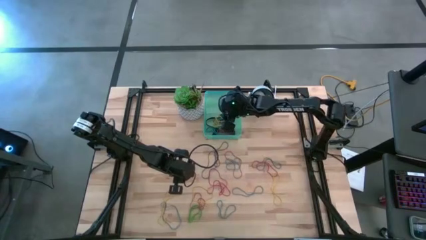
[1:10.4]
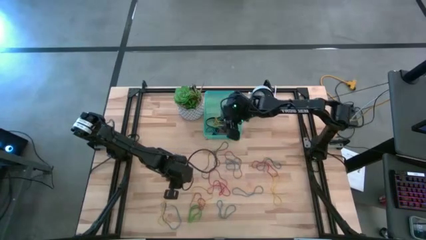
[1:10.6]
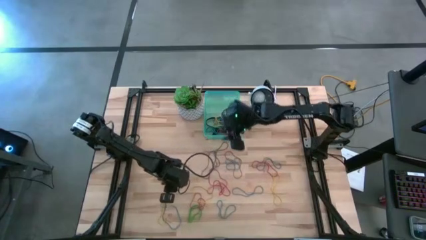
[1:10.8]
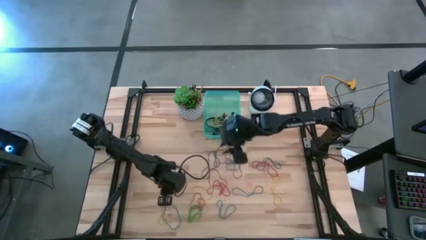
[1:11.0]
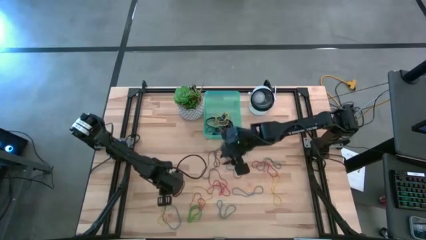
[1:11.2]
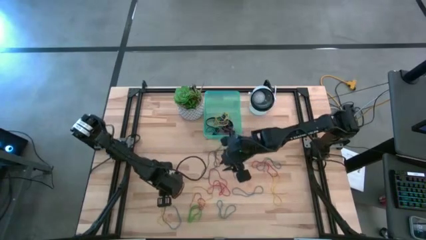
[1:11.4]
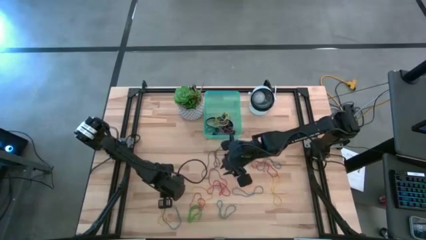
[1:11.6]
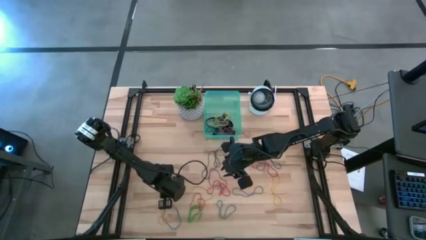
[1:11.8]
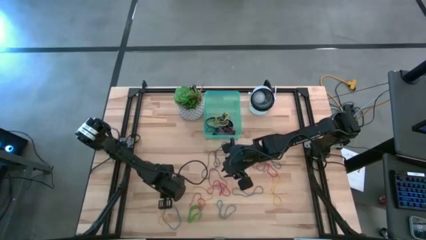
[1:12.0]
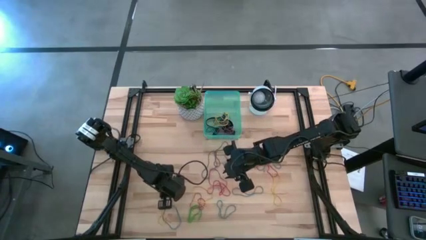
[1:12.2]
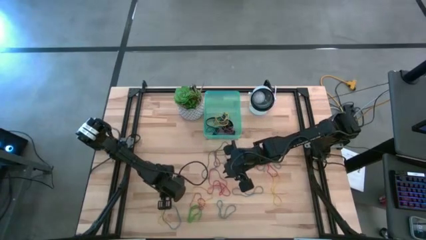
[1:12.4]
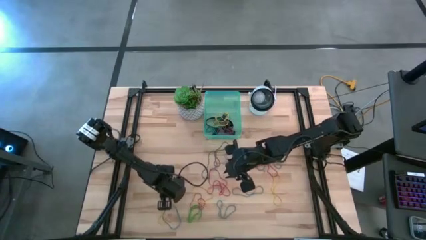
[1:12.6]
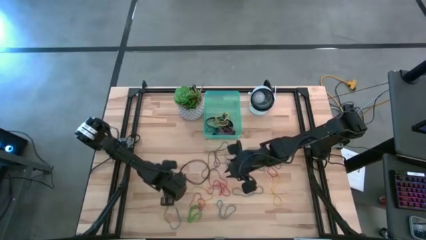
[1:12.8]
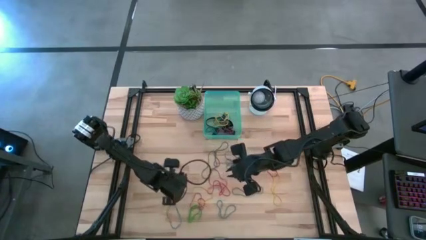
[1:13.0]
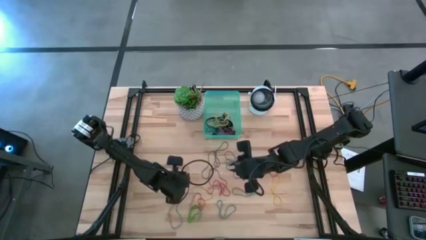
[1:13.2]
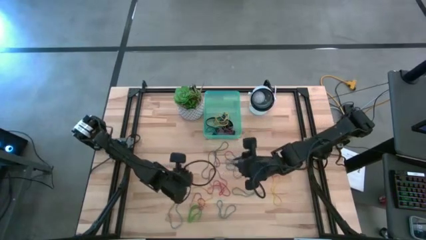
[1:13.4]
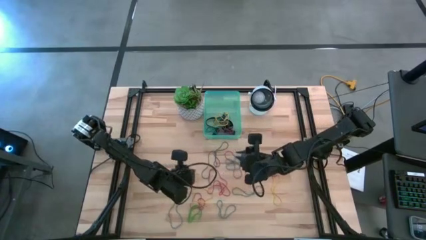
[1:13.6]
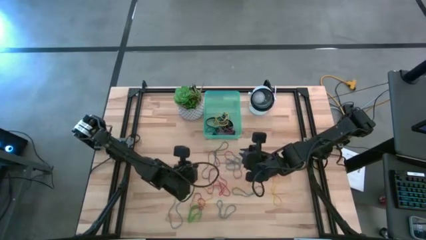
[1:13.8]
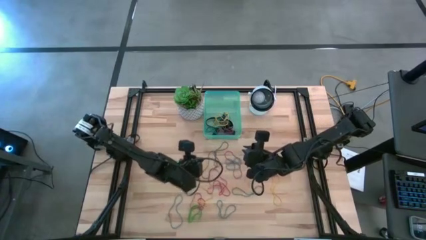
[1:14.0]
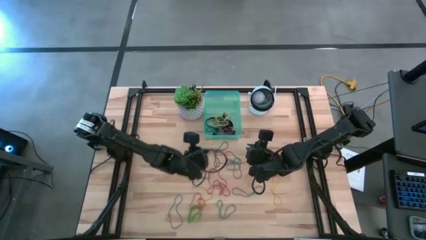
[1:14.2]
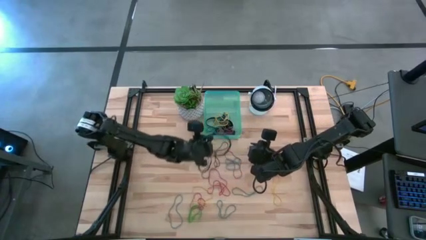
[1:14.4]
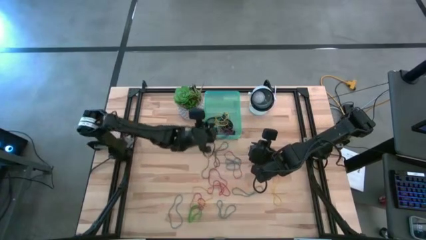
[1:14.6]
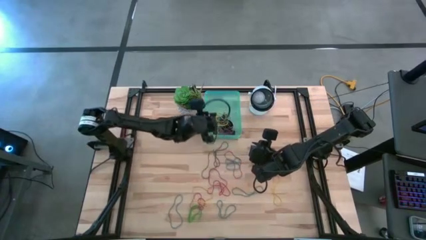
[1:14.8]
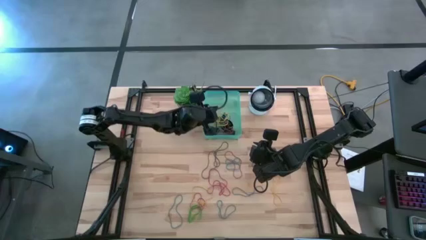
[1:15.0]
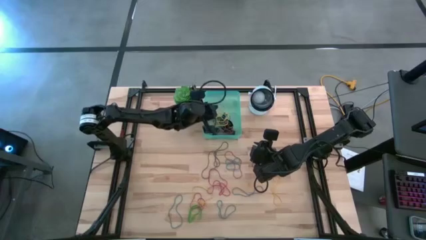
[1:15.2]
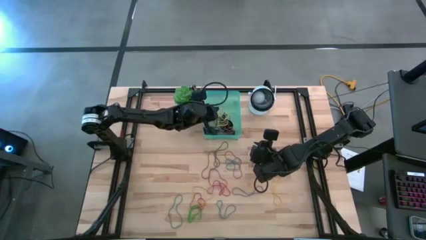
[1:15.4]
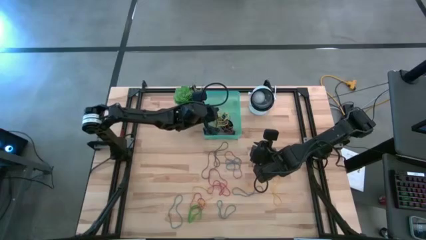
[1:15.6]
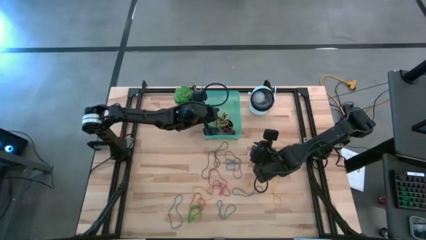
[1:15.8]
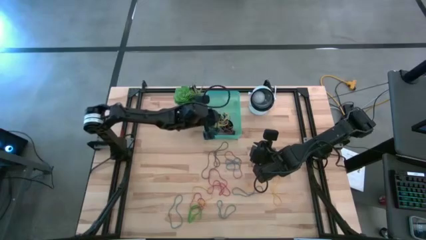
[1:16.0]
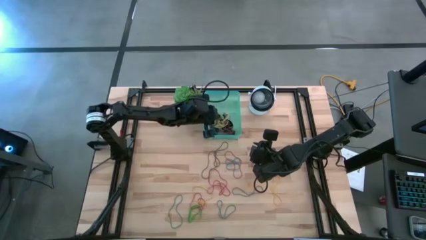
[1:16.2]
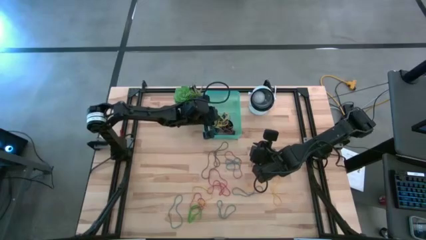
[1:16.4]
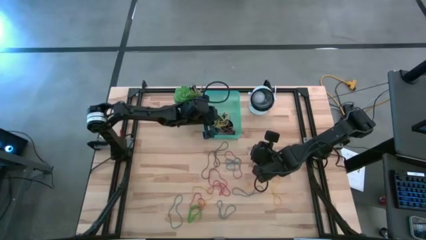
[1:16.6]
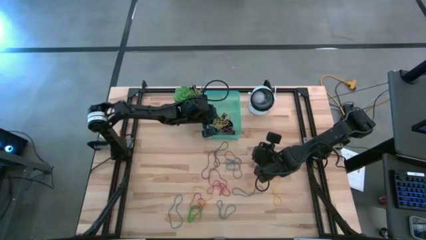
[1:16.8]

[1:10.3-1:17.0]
Task: Pick and place rubber bands into bin
Put the yellow rubber band into the green bin

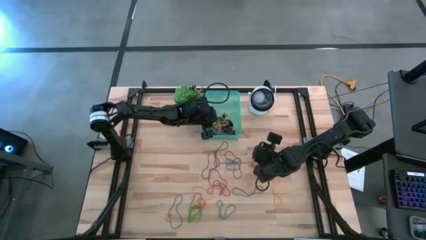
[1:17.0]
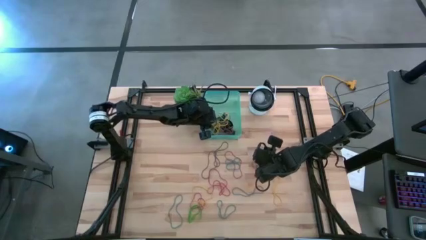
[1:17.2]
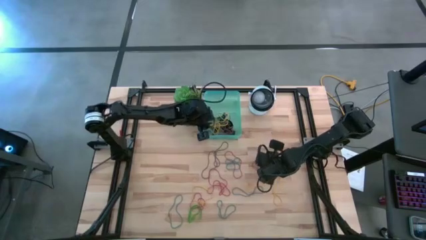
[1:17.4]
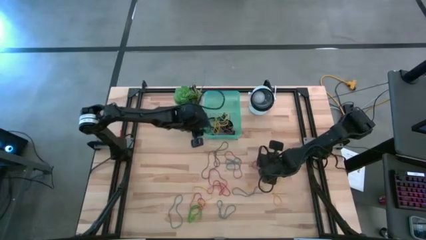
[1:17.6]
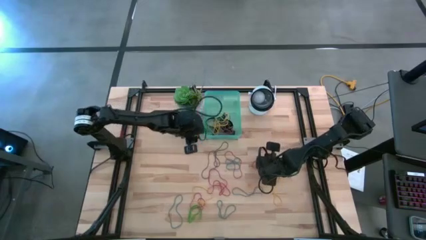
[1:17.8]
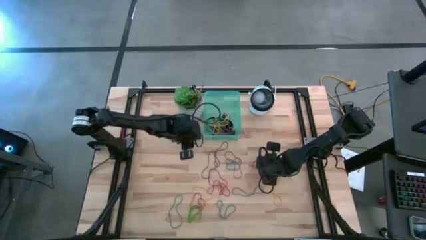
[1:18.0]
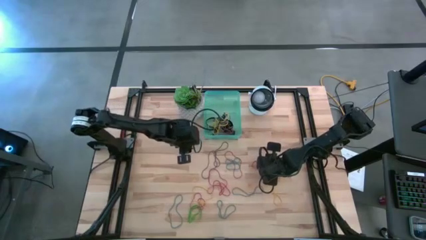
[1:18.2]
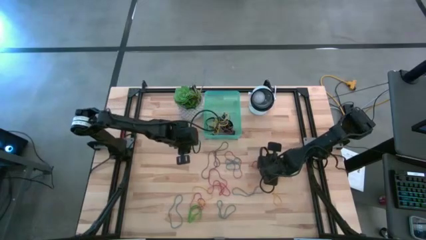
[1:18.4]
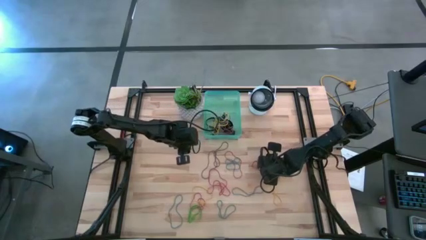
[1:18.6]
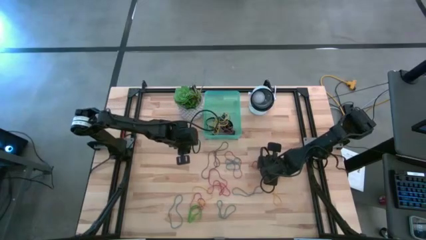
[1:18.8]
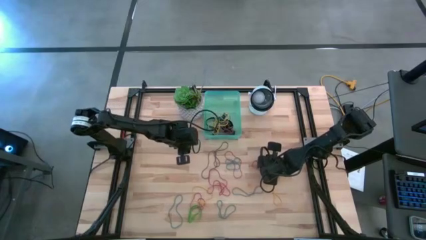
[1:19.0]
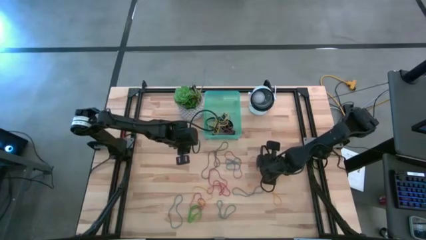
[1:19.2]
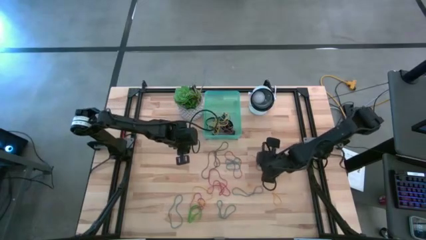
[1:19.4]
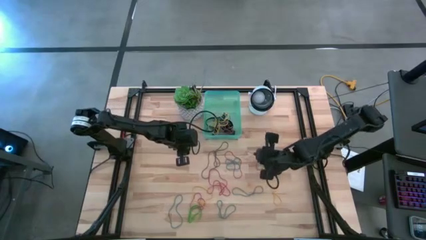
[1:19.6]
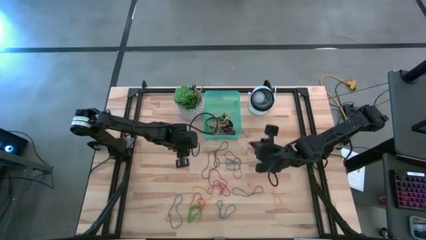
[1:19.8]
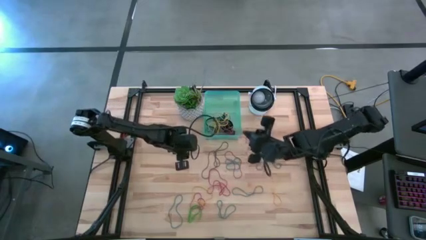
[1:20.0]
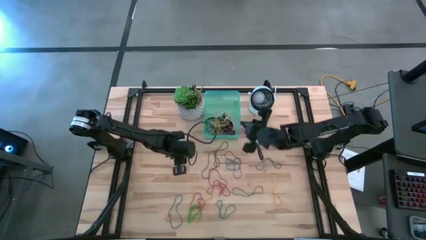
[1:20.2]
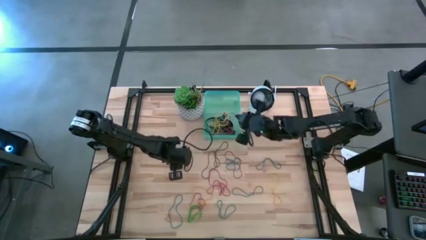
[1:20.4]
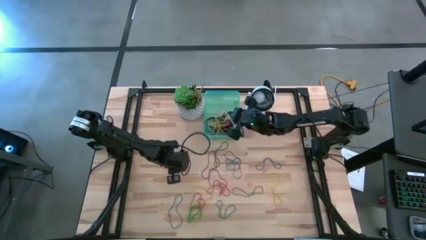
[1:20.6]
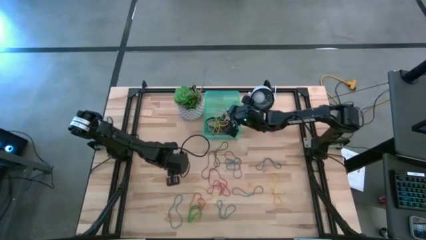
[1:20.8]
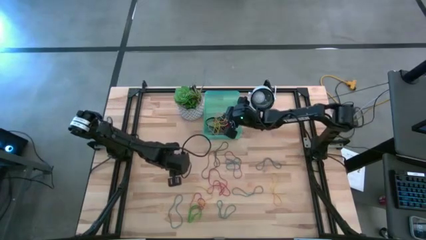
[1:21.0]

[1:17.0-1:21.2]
Put the red rubber band into the green bin

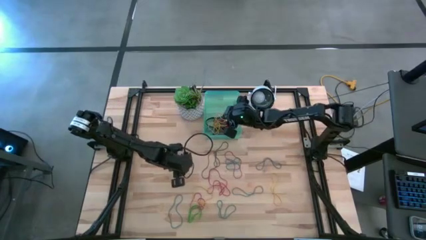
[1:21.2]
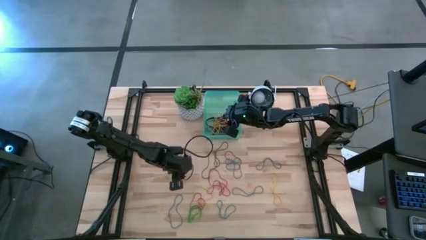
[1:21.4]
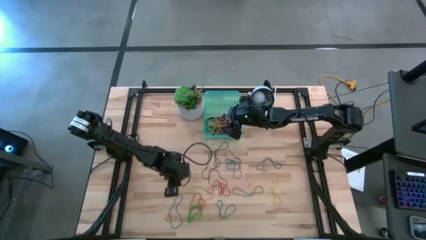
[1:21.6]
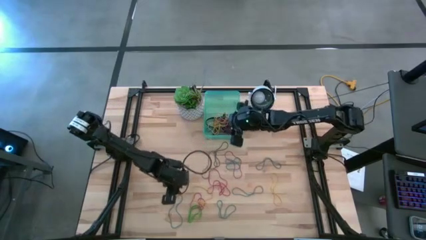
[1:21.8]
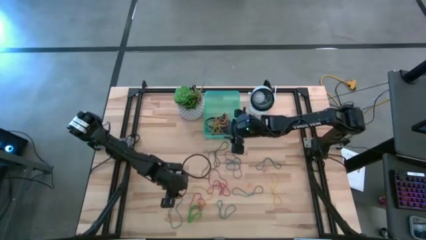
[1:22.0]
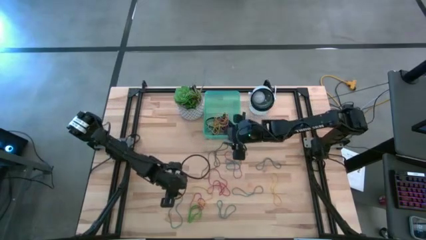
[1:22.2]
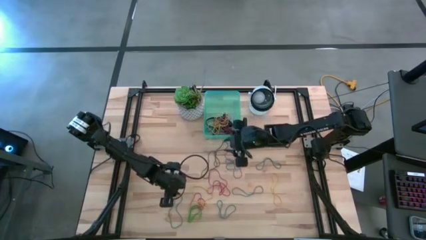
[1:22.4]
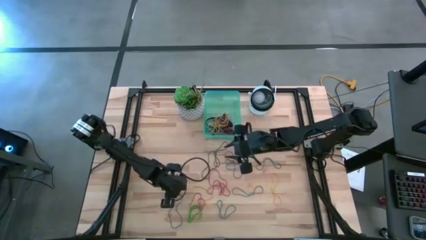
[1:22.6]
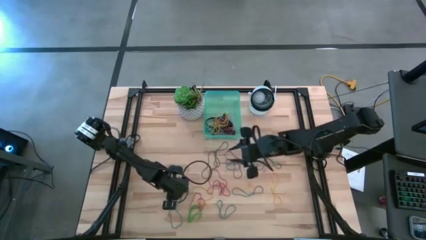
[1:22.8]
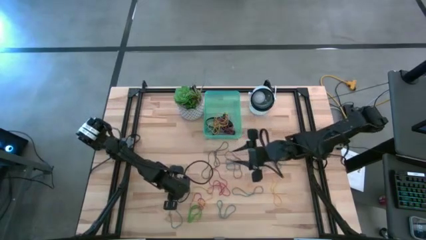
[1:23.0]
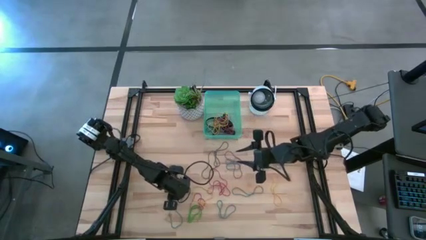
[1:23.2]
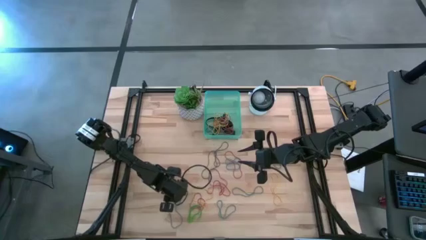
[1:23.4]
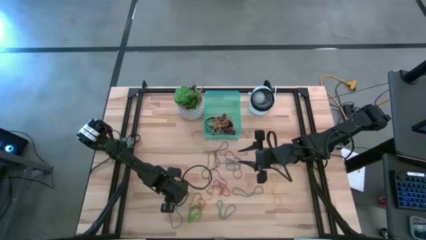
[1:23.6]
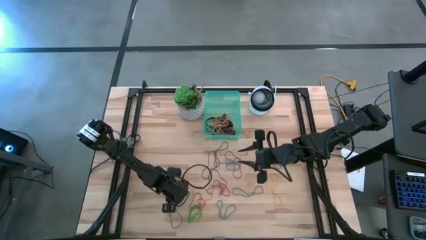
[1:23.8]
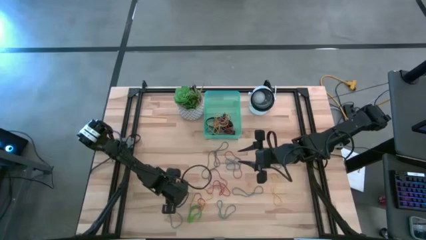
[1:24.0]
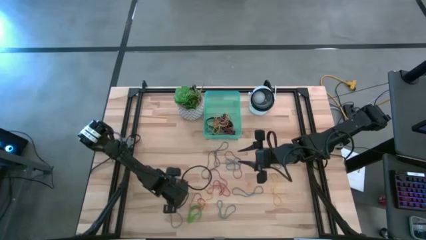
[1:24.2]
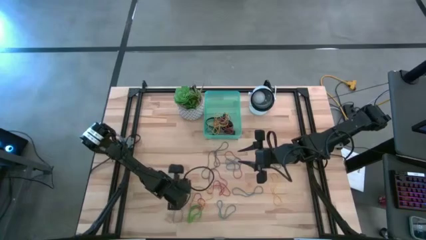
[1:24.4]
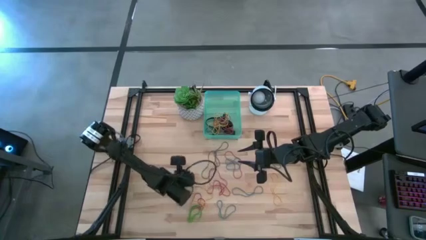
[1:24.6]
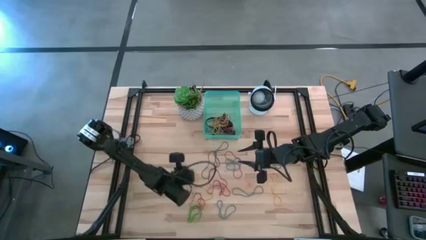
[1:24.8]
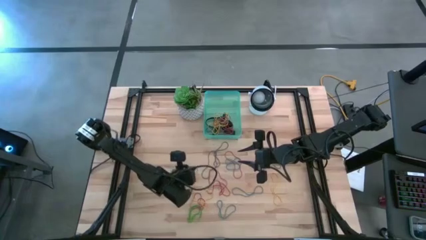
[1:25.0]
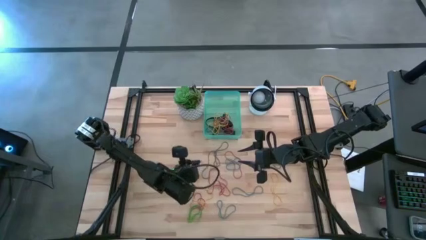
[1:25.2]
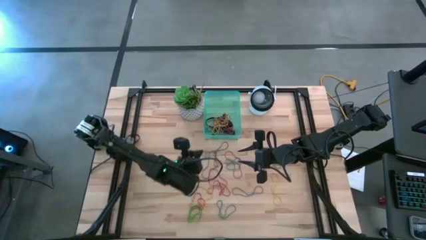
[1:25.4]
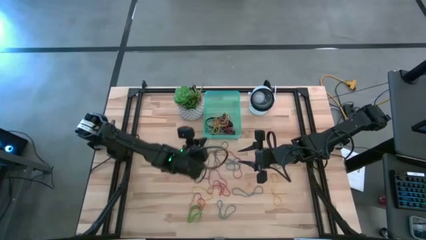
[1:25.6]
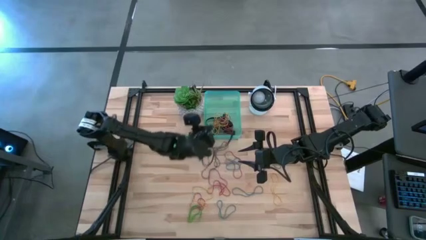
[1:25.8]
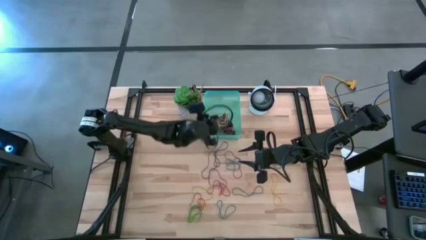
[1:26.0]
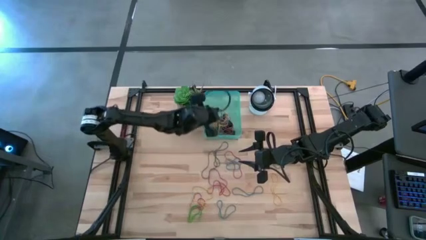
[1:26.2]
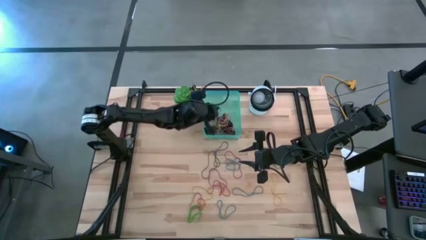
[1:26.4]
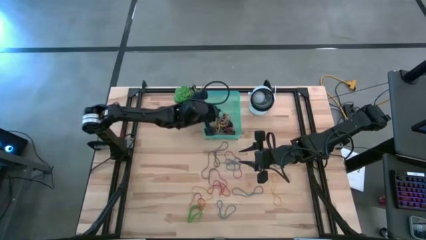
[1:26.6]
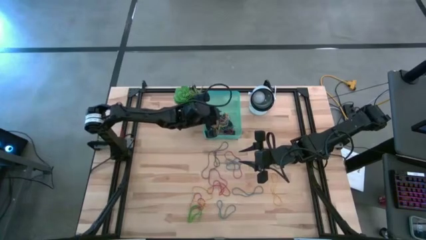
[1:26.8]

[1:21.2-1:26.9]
Put the blue rubber band into the green bin

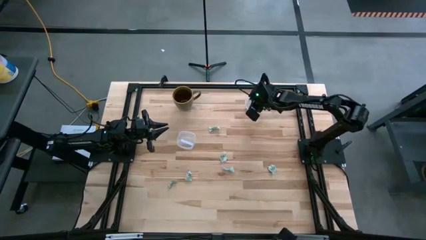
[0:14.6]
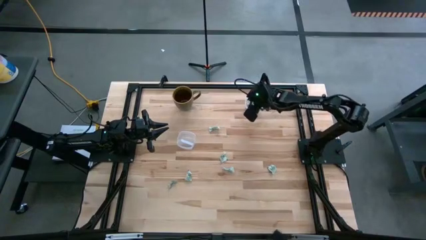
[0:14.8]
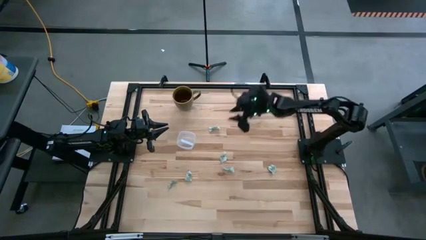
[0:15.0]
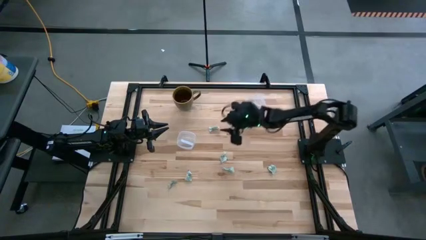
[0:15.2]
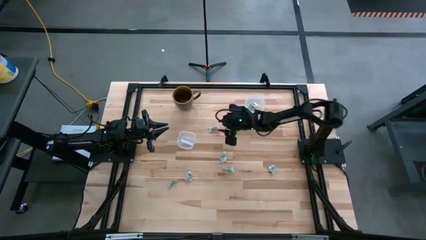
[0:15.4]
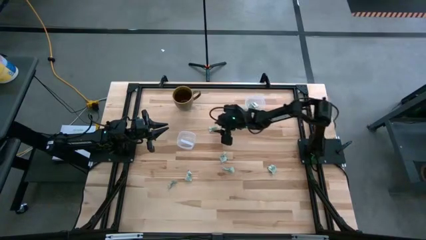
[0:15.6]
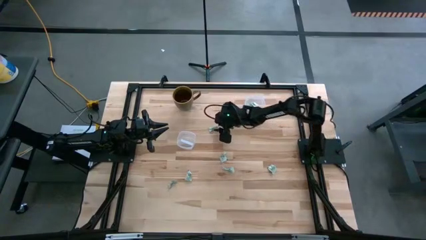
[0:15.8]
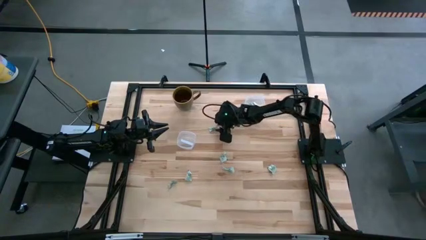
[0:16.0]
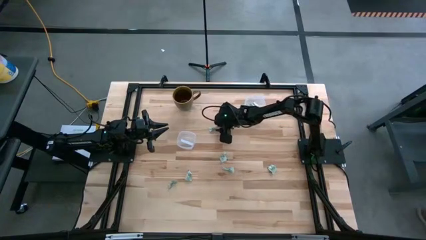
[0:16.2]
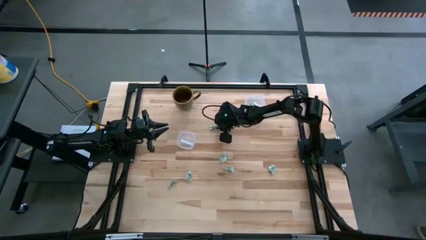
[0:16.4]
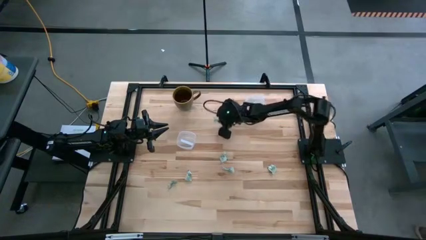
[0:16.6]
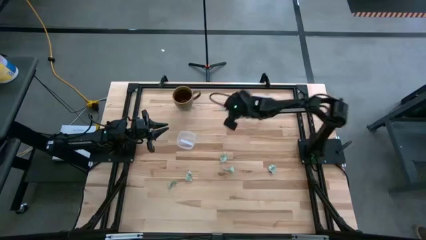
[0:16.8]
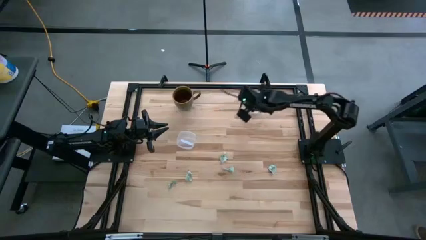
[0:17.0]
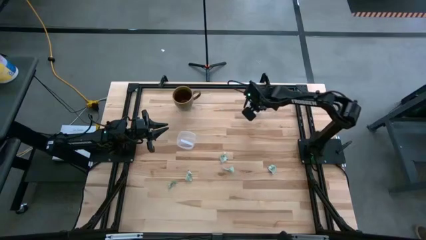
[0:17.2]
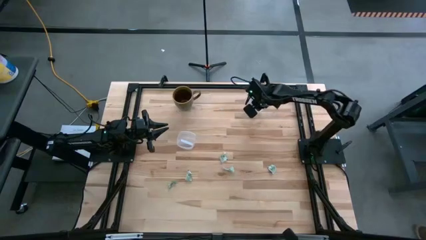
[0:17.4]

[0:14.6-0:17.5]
Task: Pick and place Stevia / Truvia into bins
Put the stevia packet into the top container
